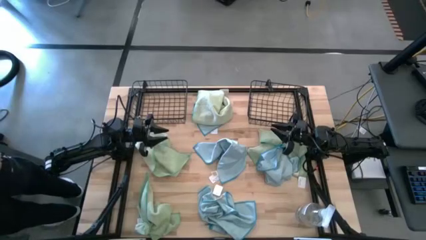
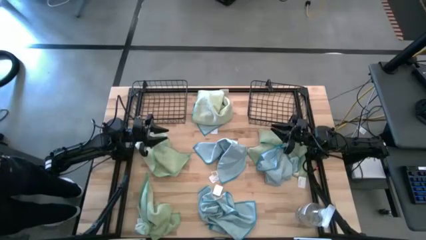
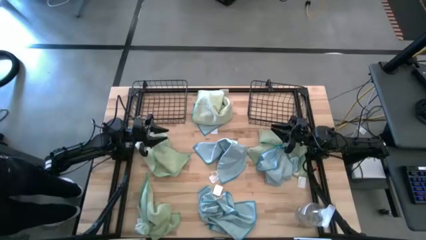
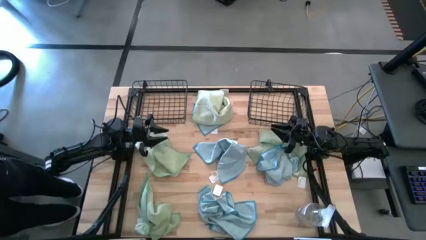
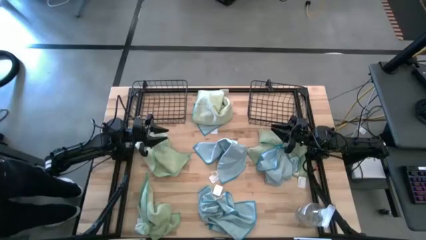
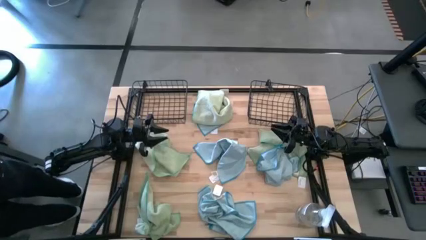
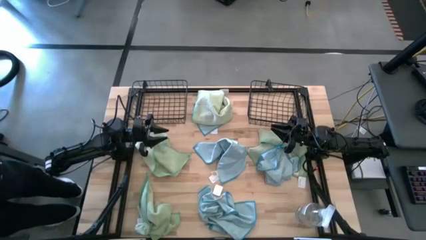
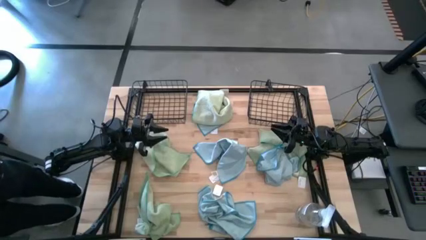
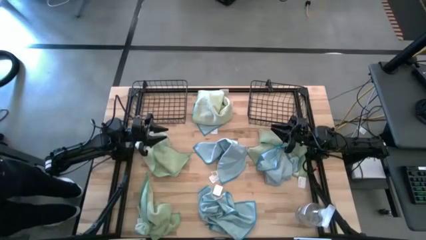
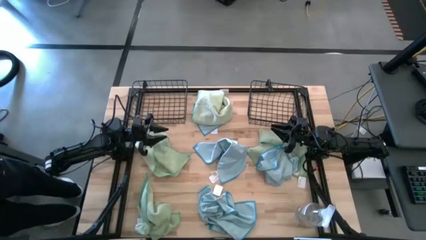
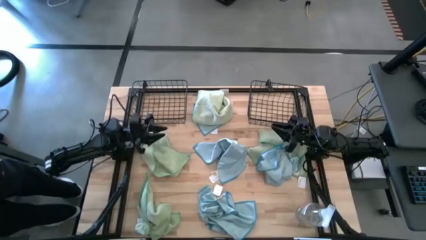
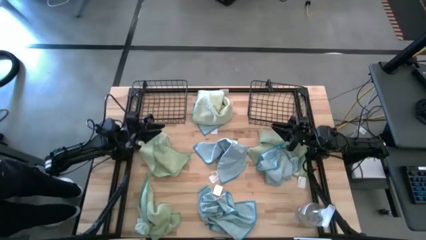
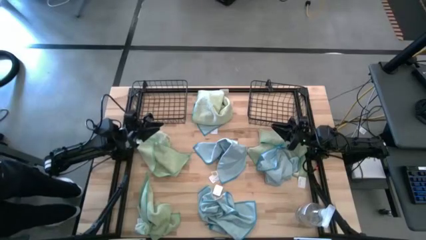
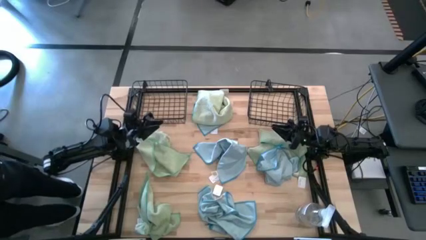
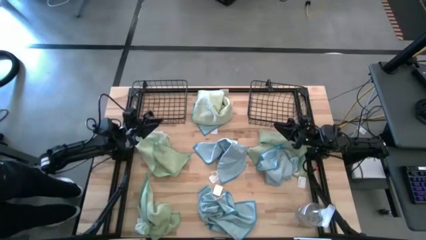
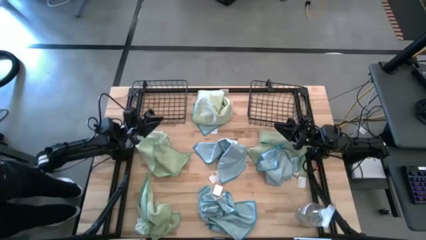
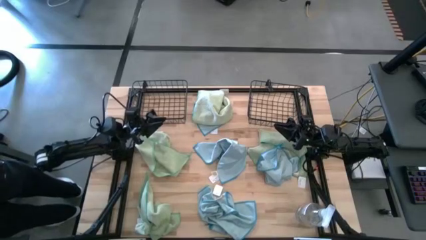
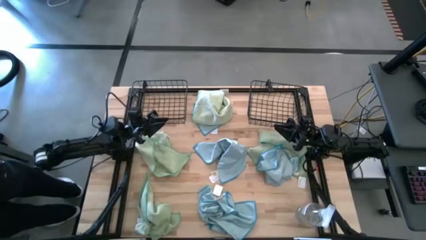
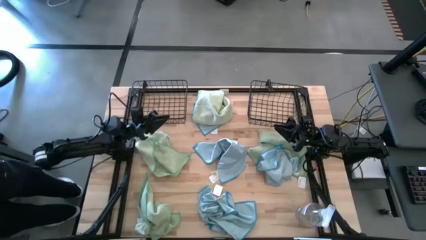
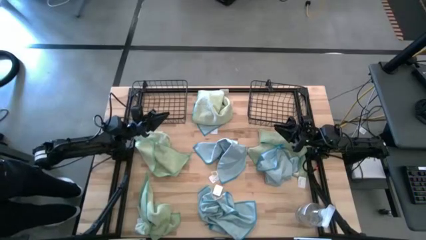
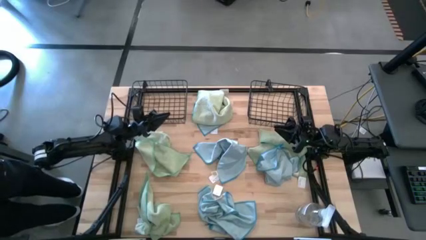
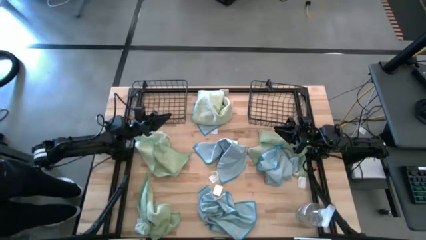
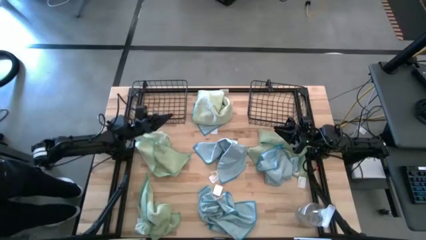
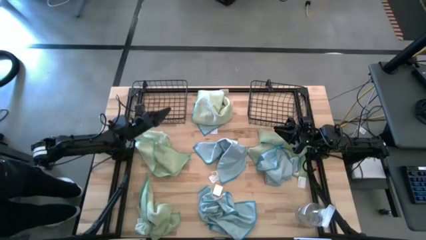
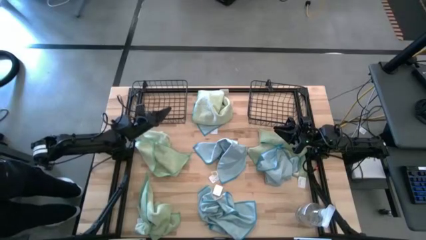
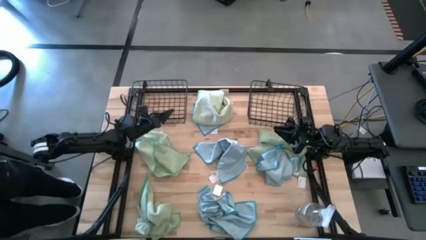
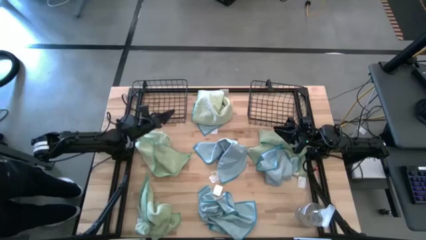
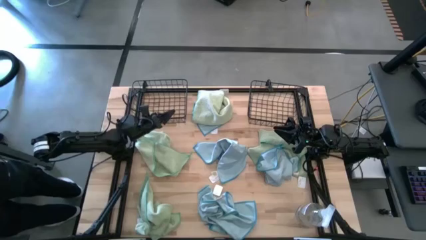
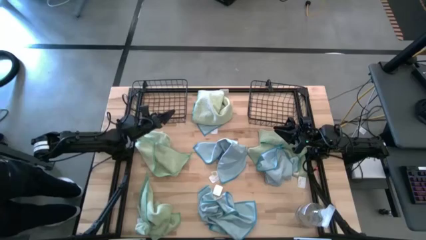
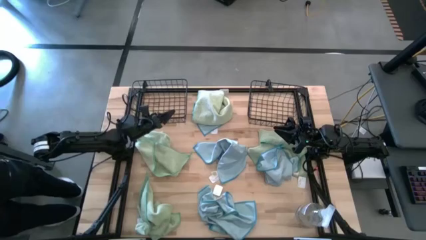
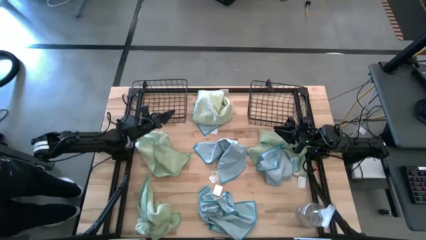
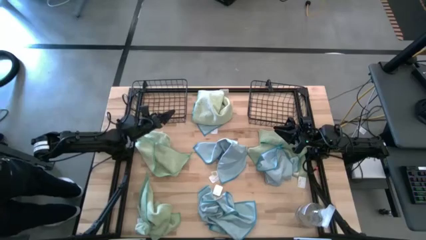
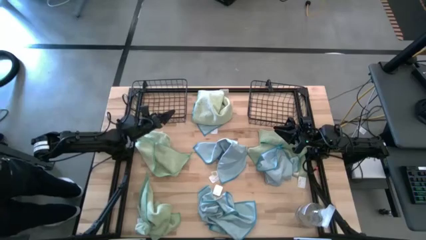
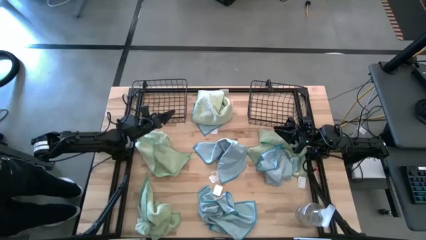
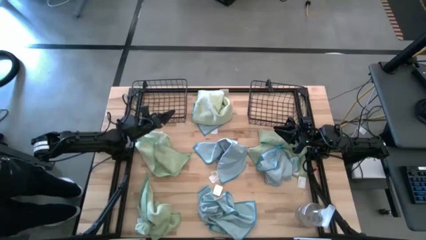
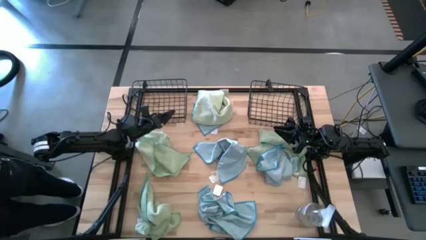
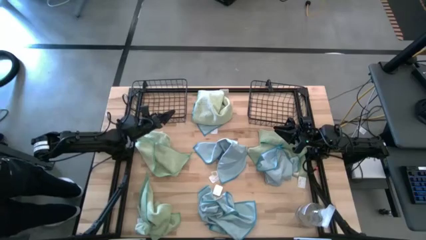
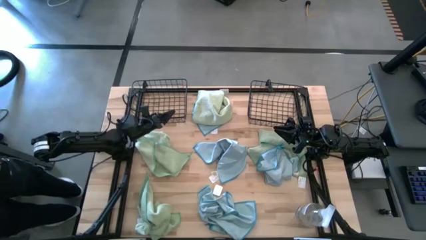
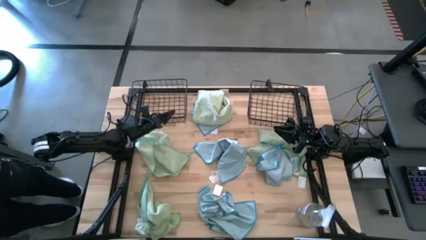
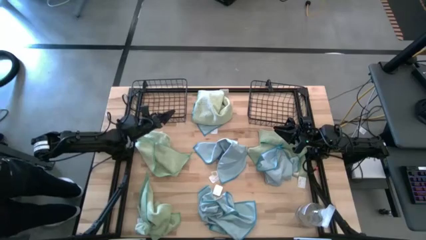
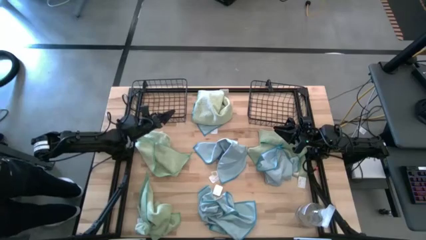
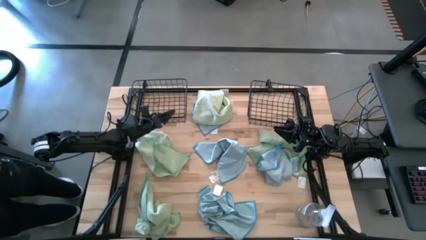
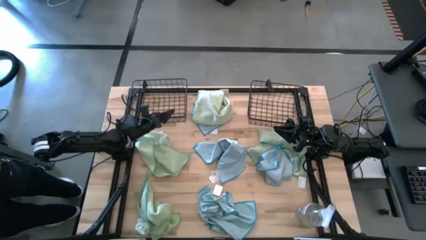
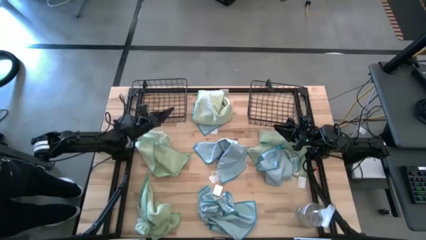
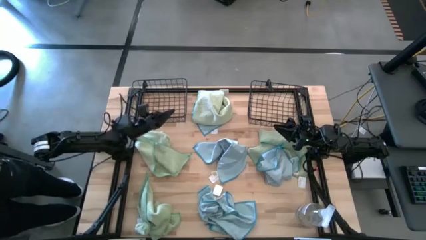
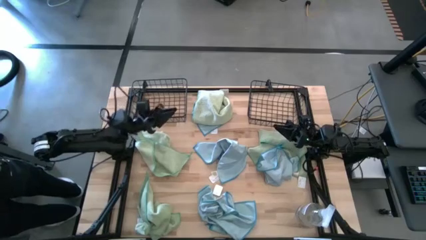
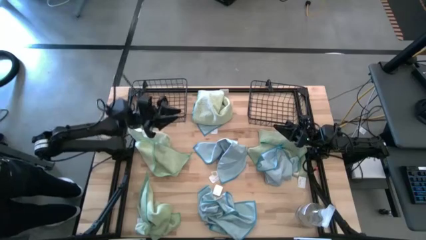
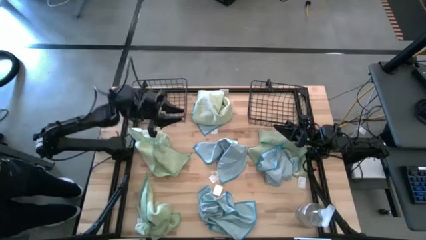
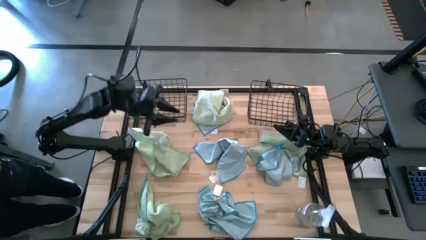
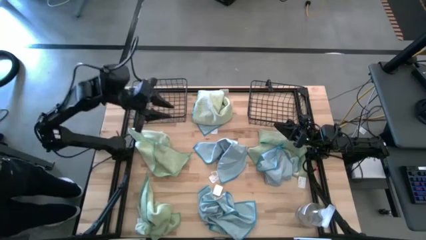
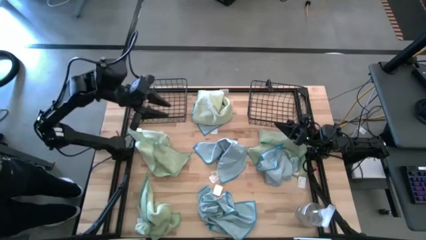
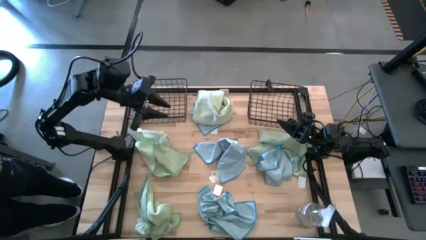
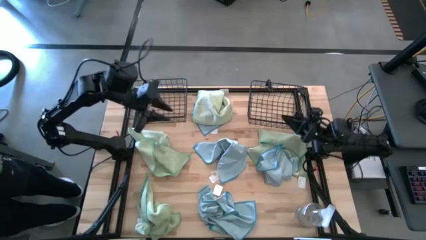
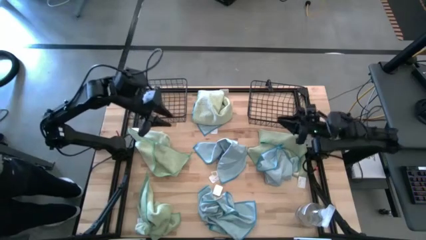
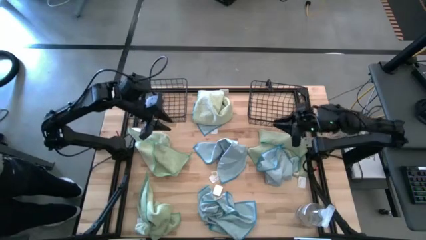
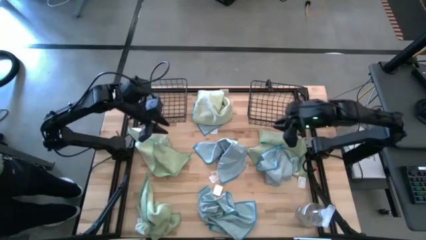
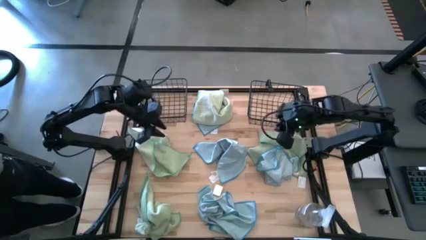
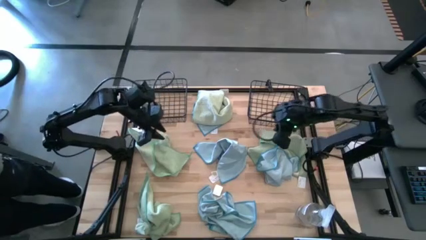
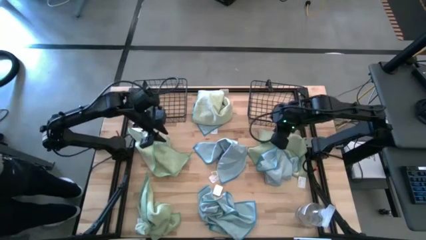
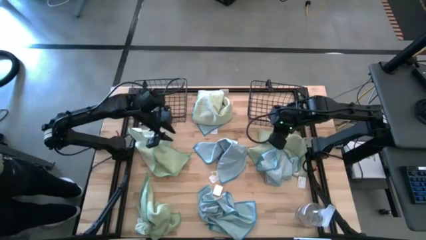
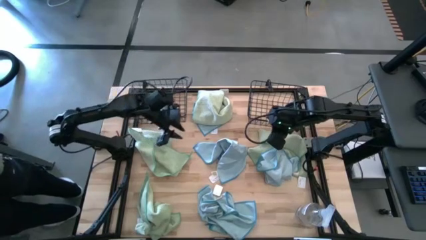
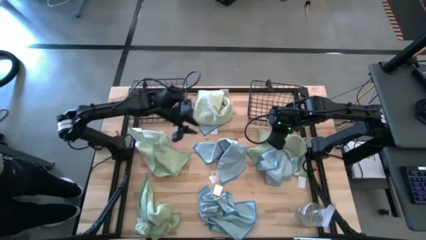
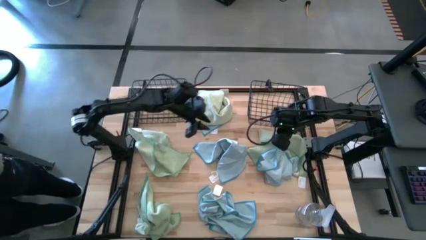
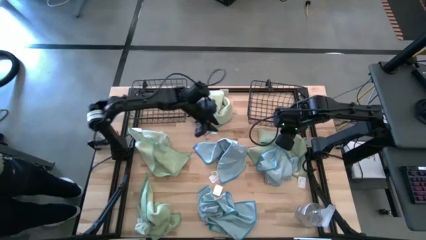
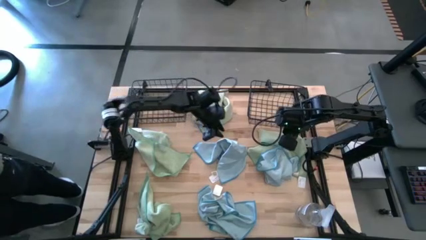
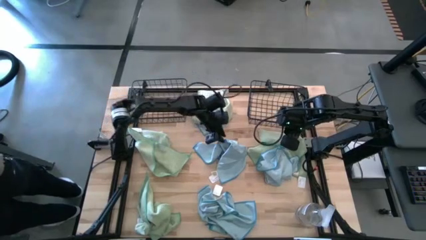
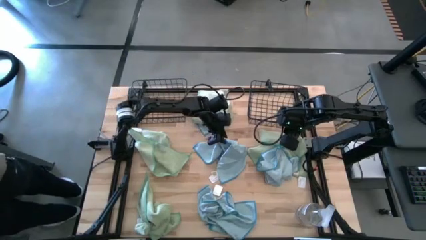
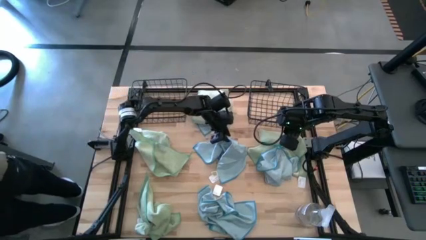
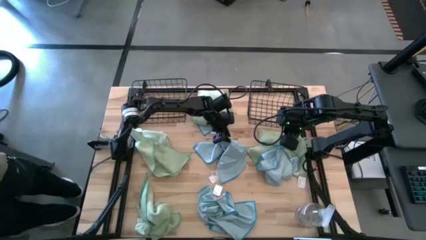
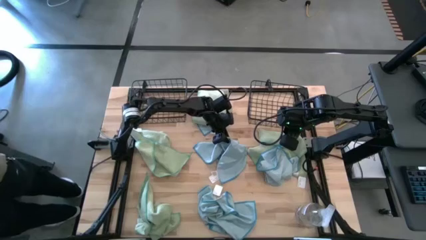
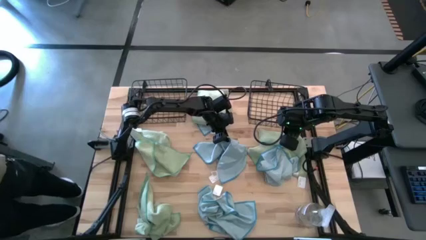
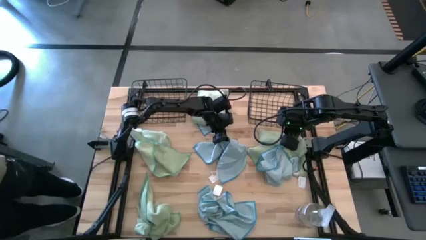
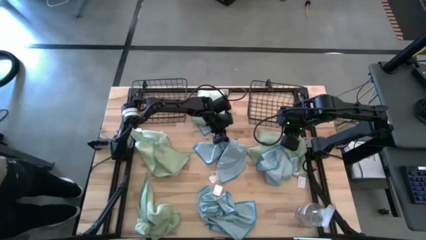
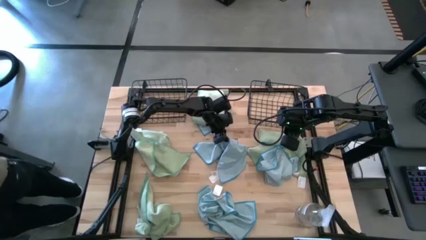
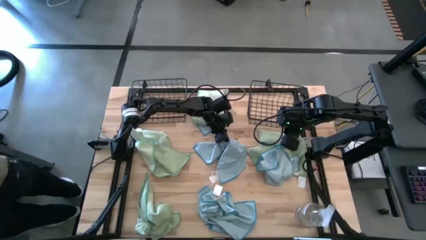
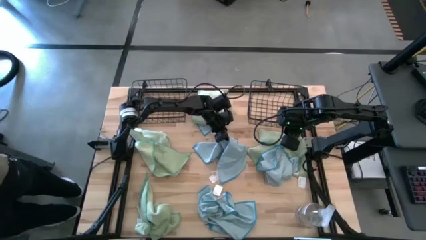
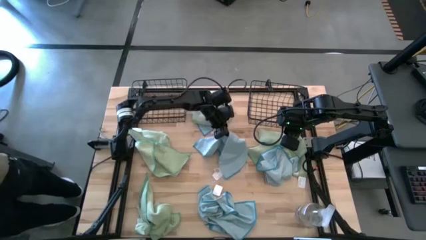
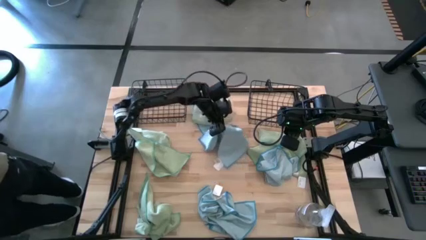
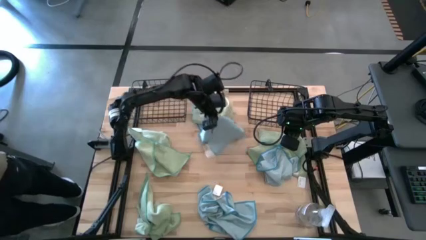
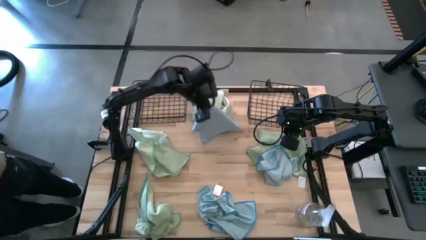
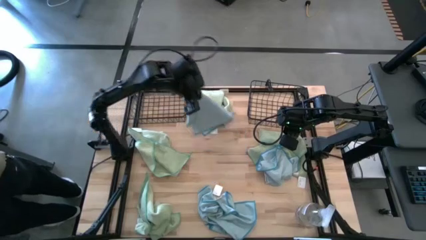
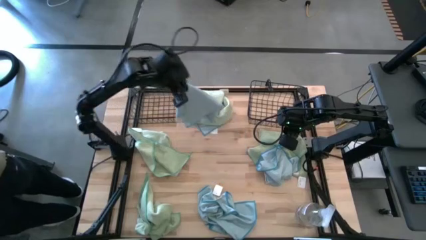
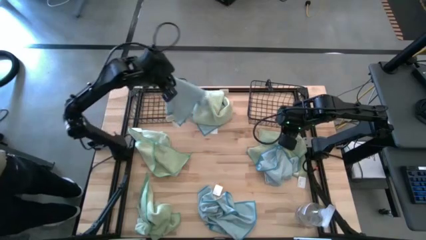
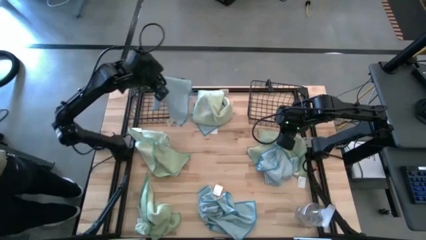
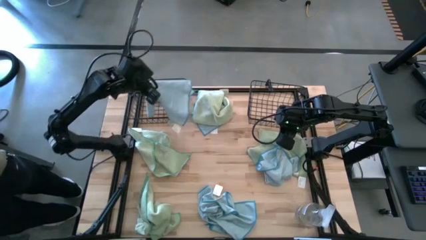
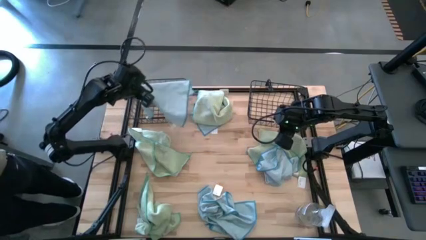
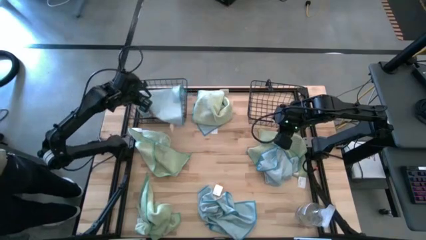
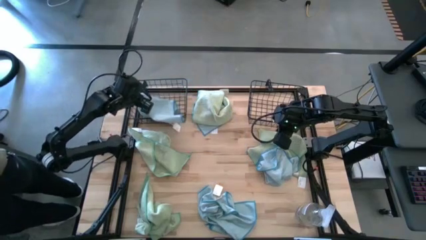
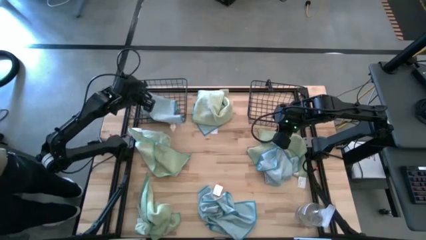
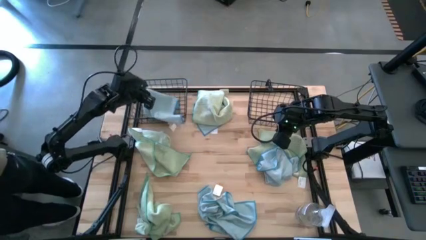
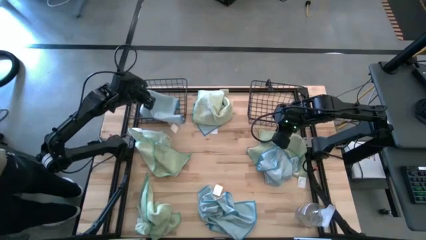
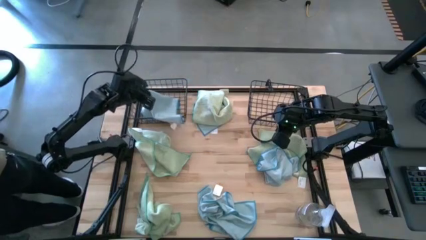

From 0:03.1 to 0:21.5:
Task: Sort microfiber towel by color & place in baskets
Put the blue microfiber towel into the left wire basket
